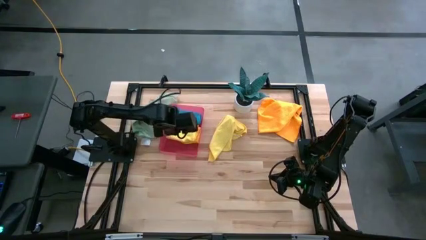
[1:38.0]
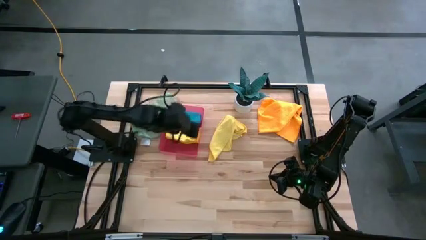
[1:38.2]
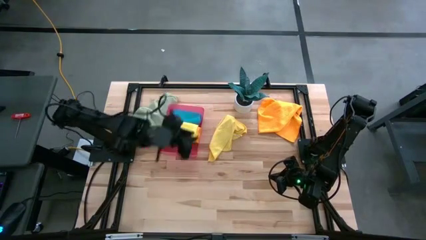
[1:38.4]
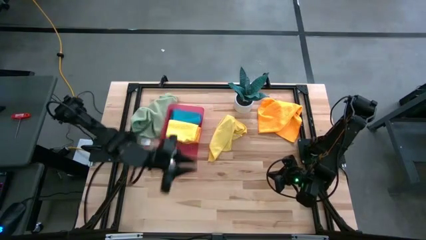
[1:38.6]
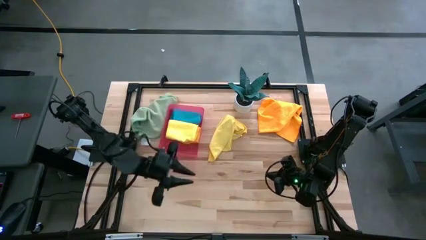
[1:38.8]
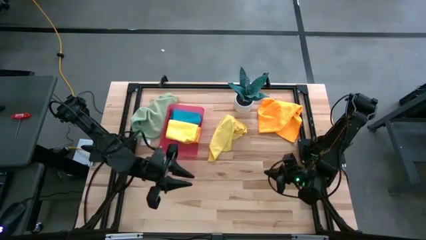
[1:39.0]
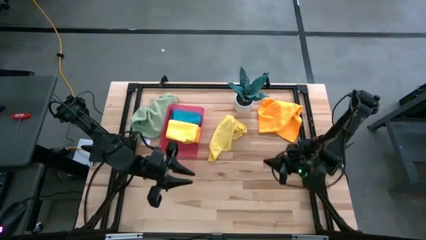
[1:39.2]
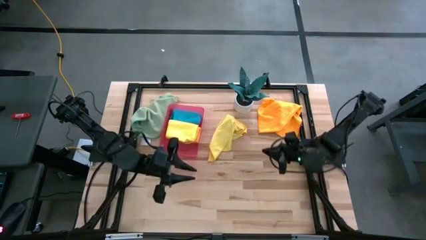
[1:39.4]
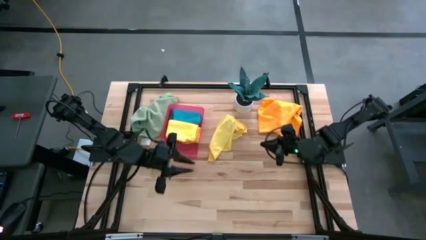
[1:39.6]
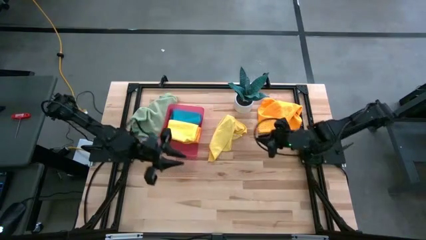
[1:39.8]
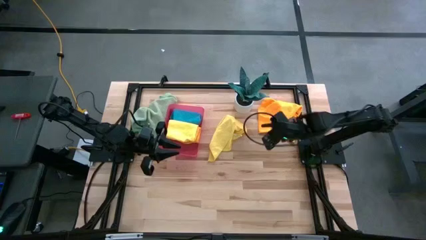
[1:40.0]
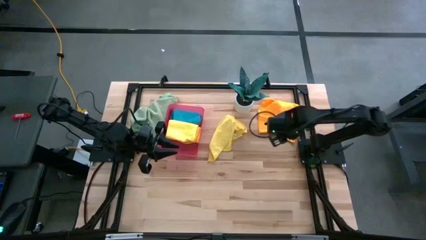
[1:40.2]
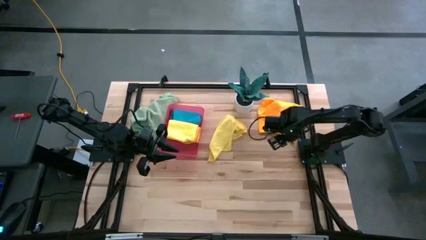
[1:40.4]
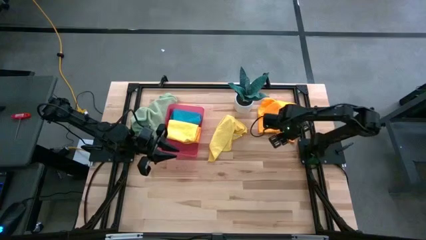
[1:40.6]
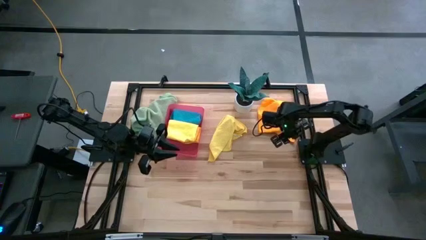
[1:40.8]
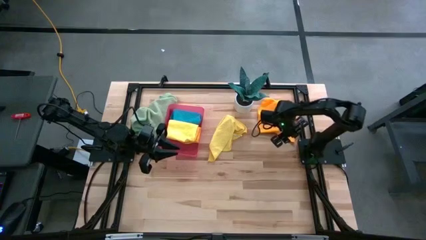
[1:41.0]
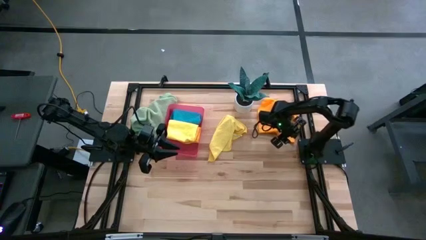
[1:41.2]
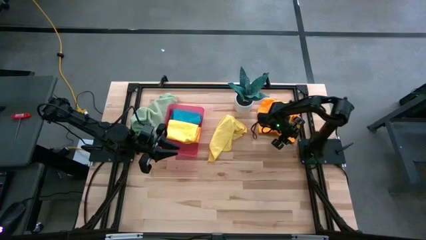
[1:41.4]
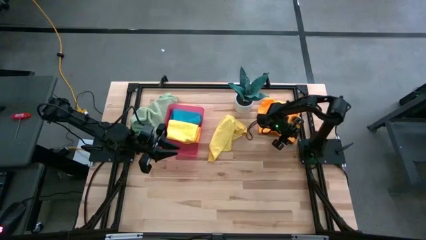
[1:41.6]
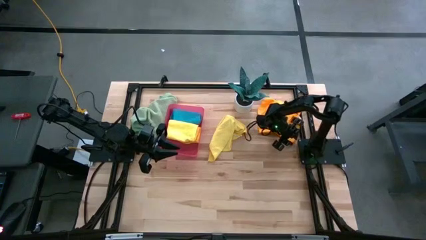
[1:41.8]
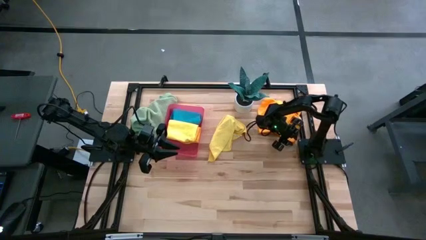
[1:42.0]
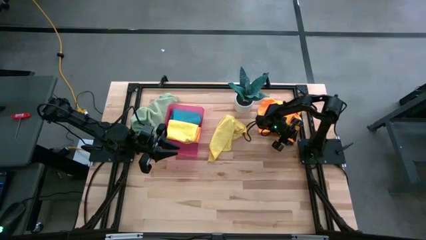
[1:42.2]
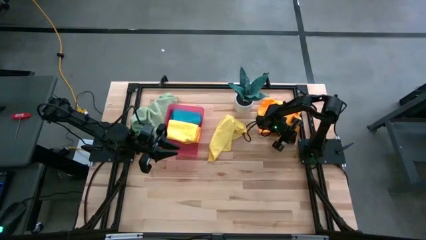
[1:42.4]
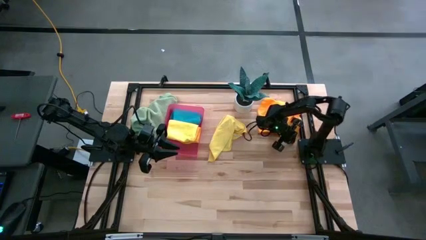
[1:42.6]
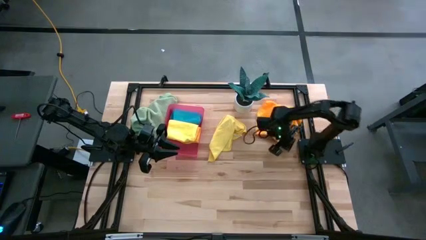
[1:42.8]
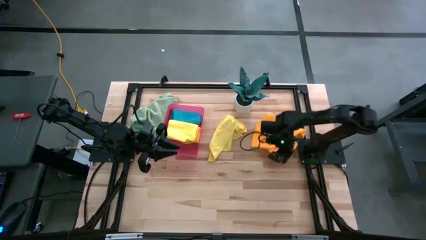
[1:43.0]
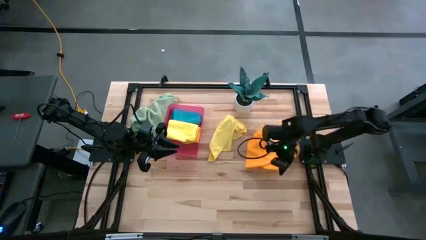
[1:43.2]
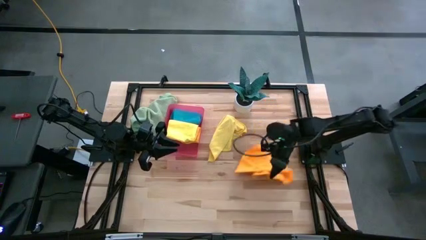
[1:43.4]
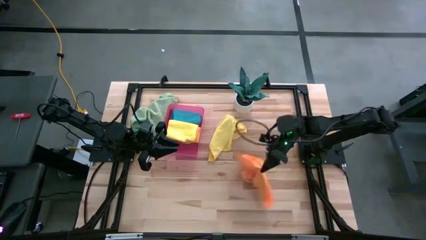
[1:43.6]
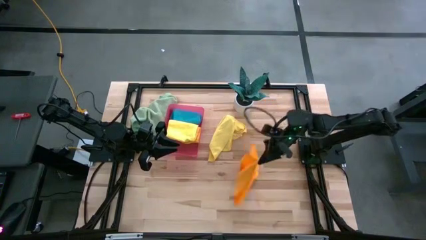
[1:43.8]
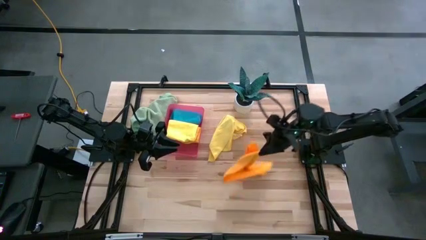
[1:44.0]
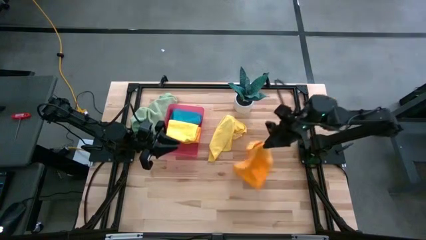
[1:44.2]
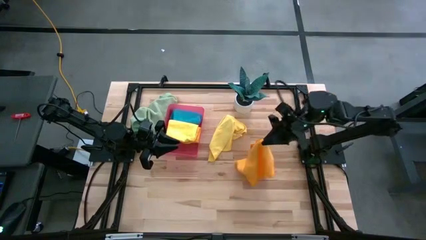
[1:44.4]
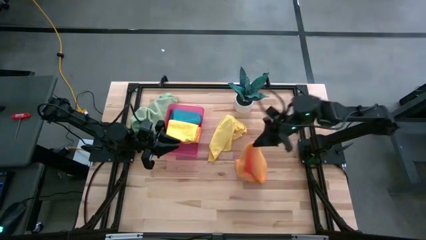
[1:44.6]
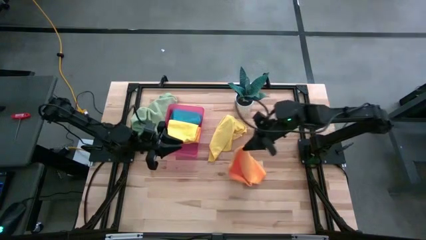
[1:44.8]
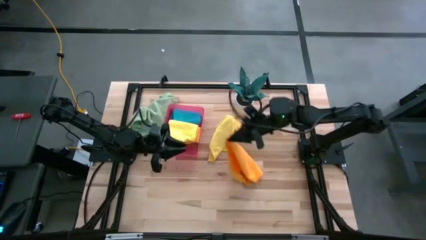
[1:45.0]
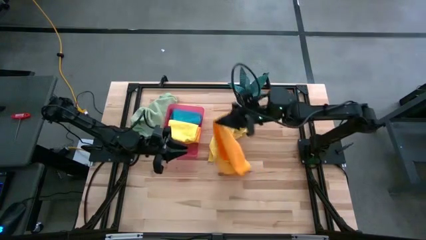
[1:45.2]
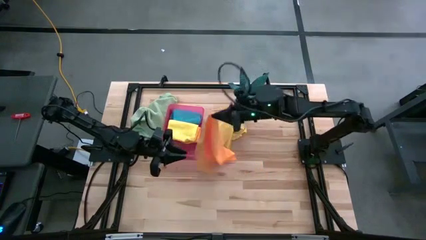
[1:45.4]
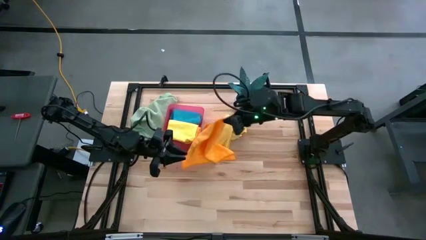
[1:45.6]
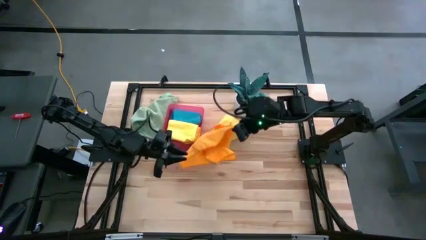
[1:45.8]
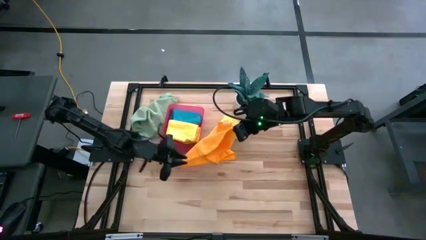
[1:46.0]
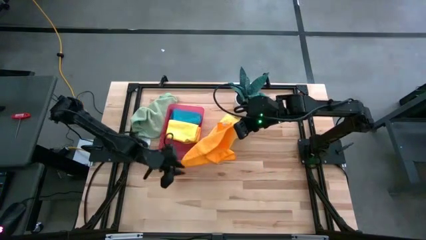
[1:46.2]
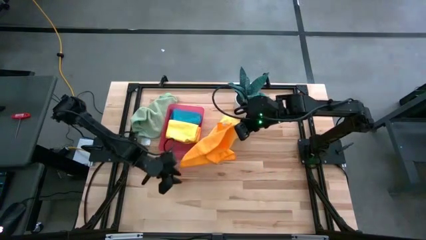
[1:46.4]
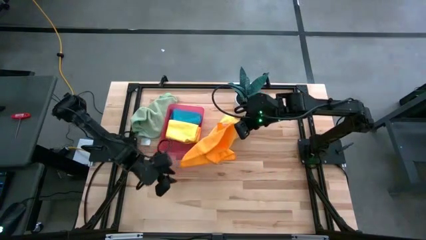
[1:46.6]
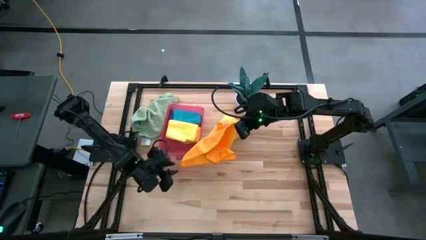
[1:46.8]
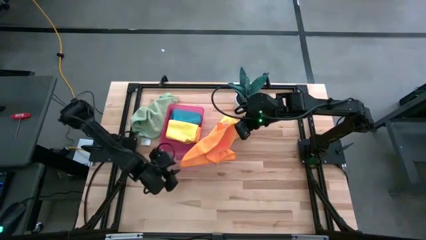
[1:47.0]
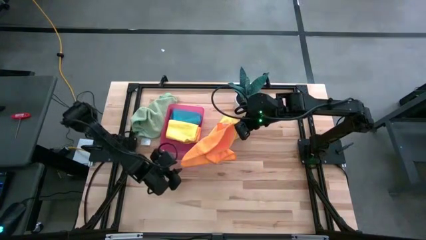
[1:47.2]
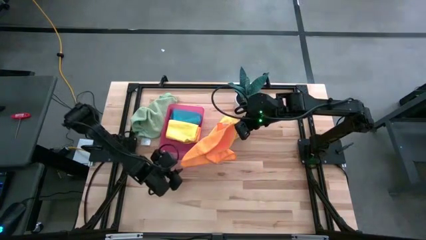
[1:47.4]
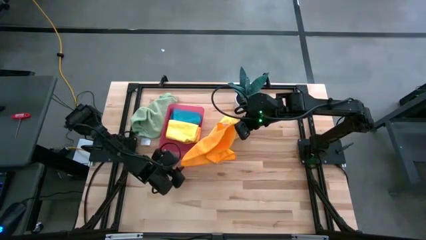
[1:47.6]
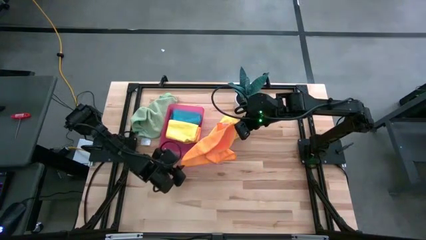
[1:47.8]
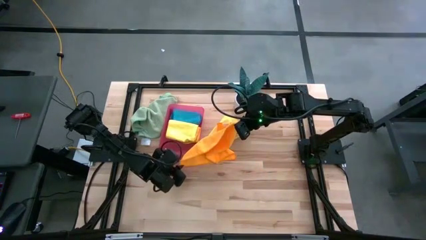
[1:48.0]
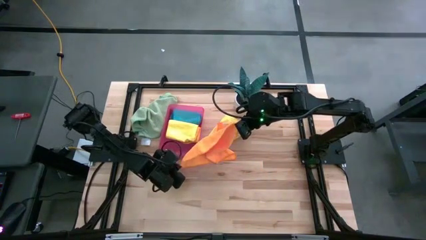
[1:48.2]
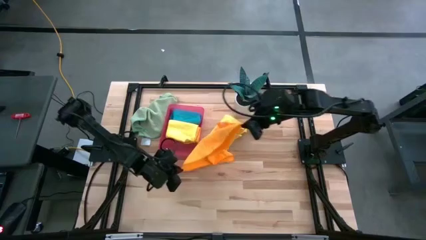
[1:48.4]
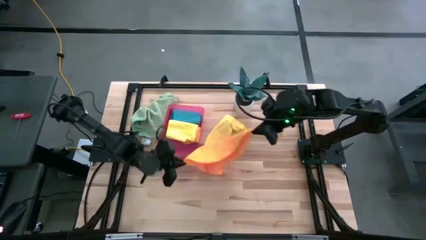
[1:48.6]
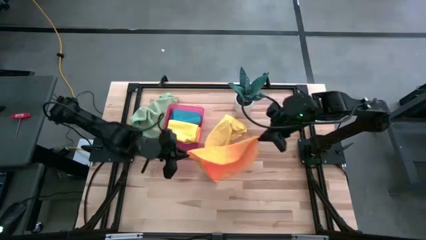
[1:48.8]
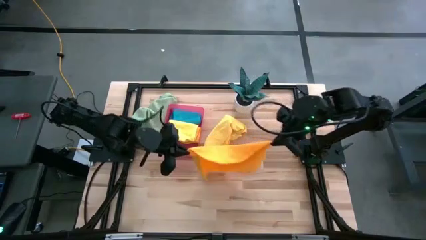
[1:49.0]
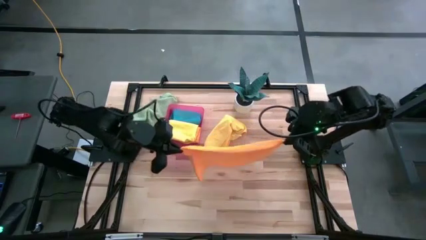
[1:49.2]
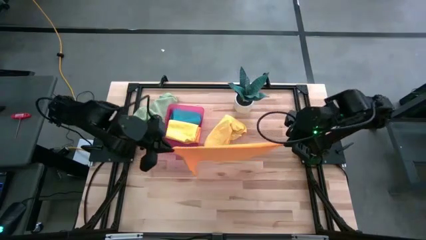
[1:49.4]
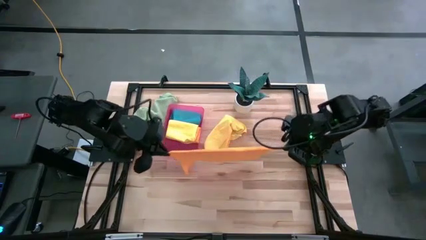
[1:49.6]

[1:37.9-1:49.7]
Task: Fold microfiber towels
Fold the orange microfiber cloth

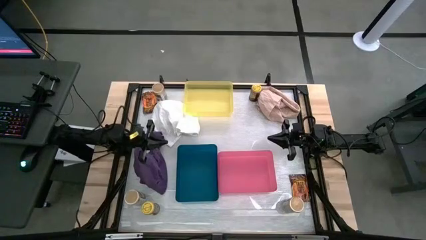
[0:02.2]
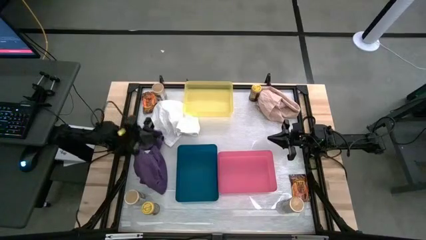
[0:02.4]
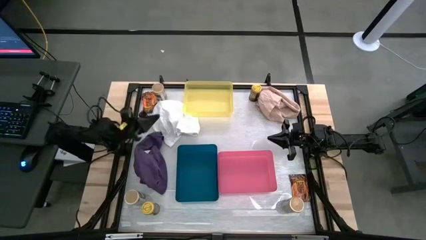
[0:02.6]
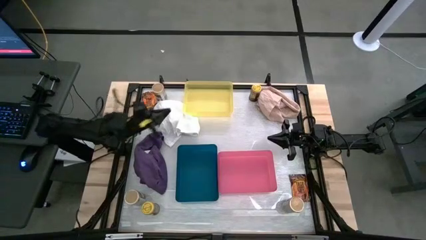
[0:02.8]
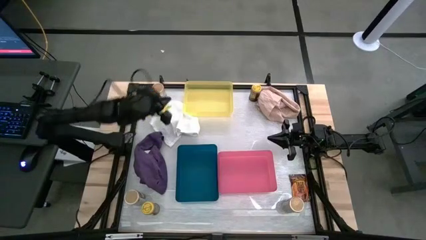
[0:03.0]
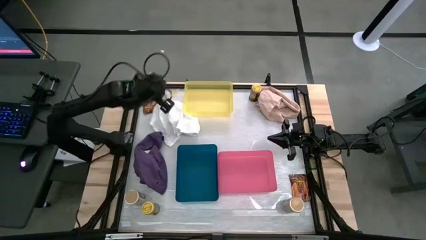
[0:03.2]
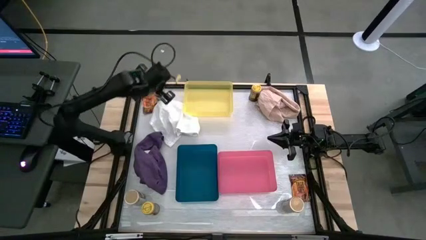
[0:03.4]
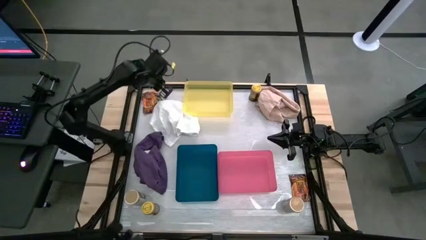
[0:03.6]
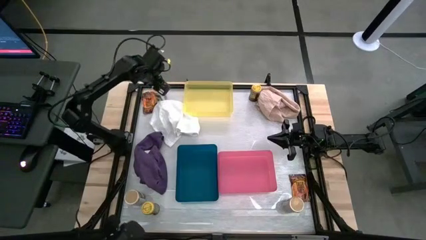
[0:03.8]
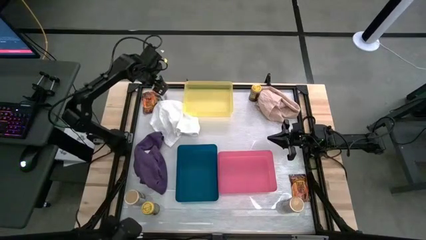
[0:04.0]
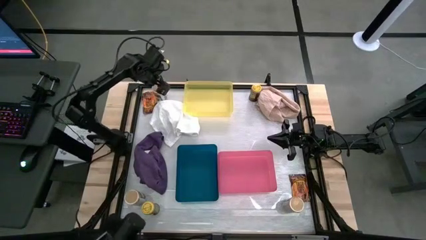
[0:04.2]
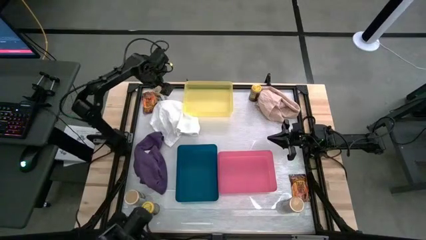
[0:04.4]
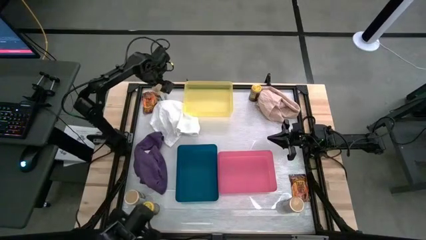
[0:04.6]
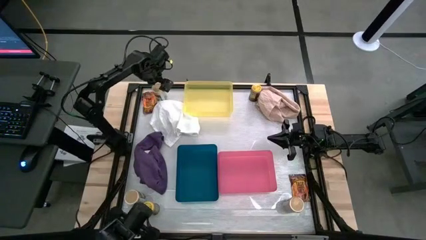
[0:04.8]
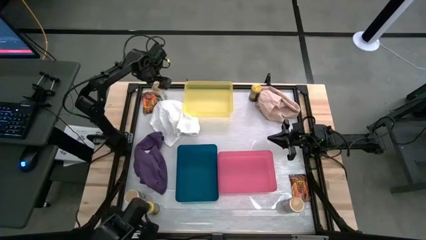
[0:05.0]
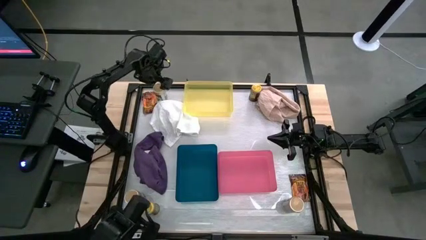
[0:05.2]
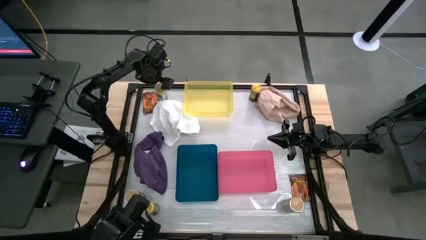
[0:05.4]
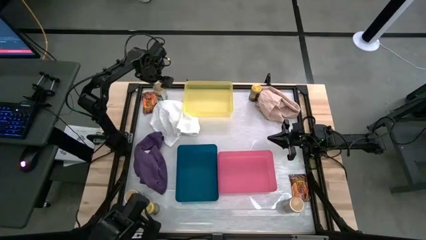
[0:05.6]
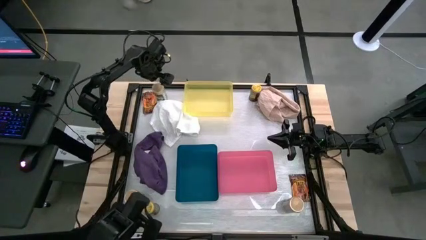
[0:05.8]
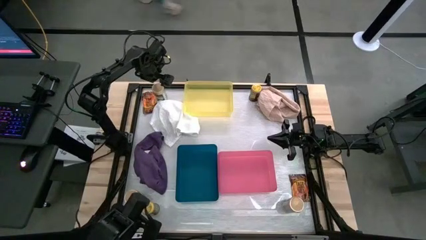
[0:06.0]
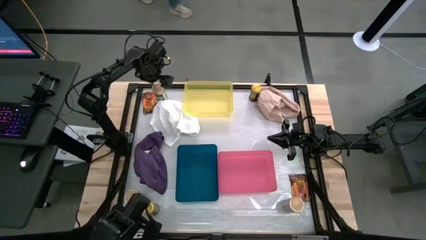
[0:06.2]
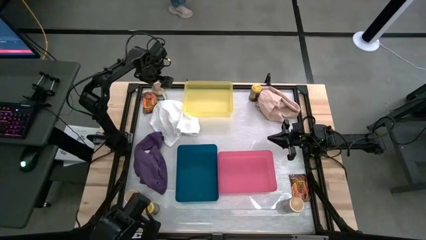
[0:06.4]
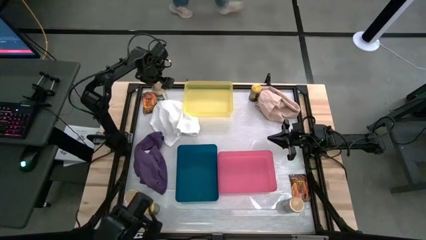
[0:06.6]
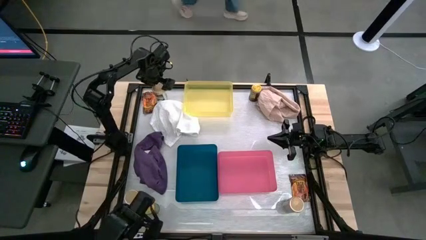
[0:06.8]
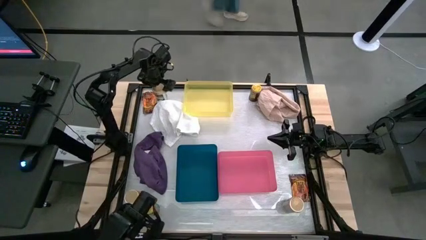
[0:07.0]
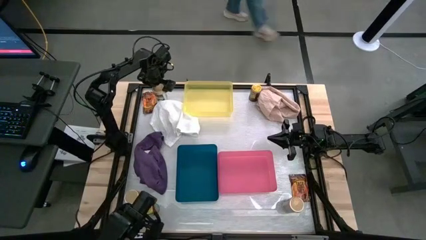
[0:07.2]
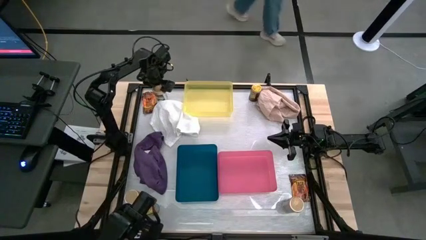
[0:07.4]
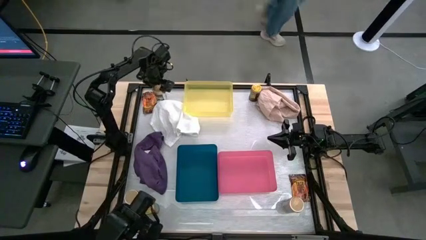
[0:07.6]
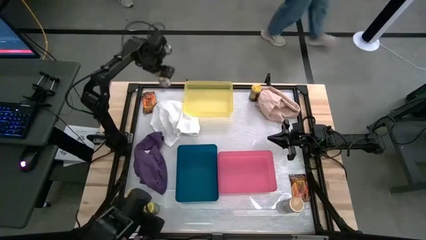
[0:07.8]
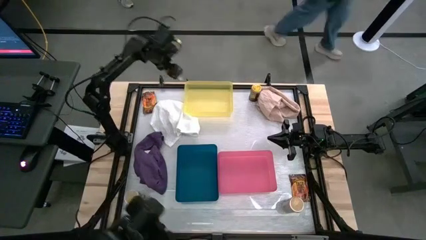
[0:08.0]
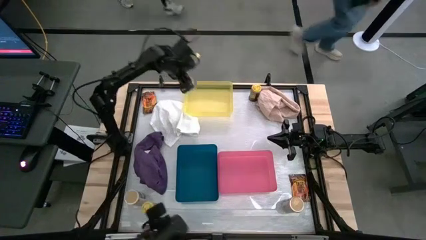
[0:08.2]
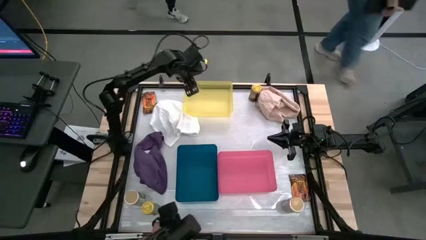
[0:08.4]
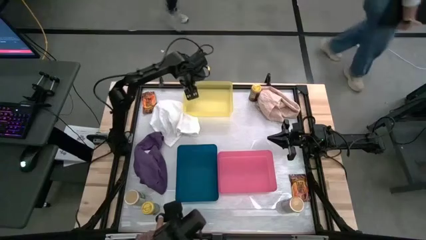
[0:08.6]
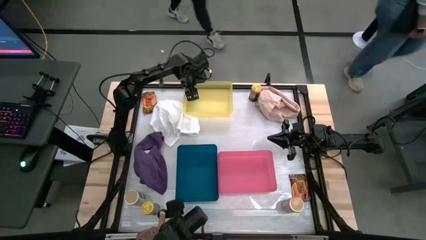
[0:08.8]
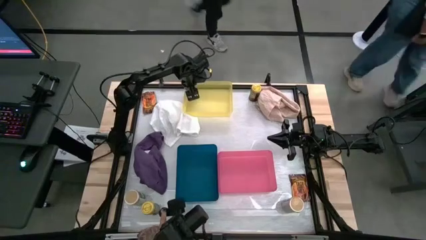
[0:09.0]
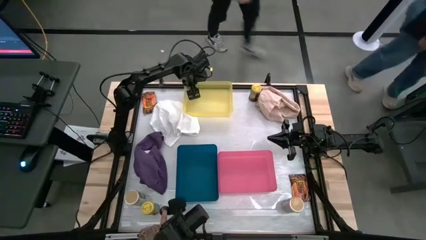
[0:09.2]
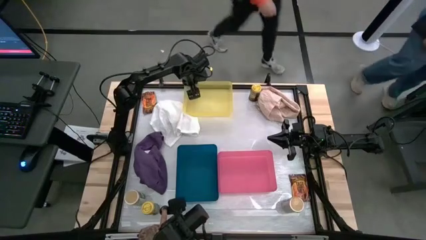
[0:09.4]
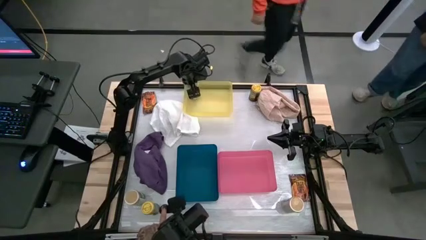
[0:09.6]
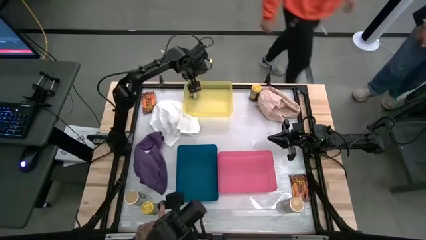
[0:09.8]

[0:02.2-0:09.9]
Task: Sort spices by type
Put the top left golden seasoning bottle into the yellow bin
